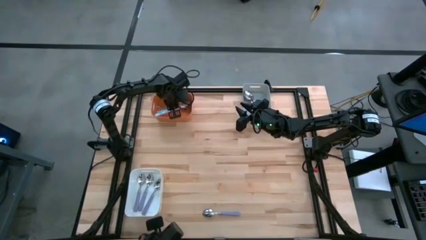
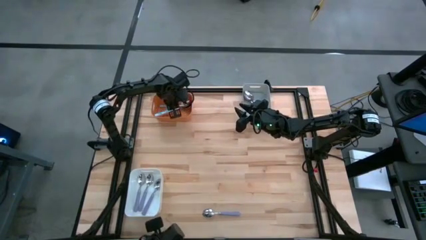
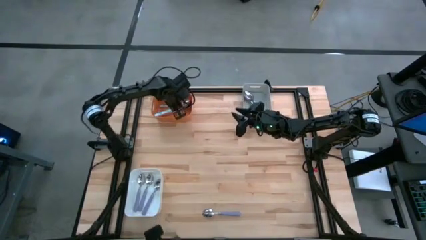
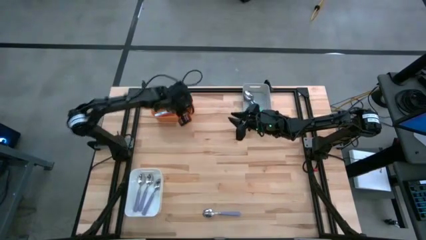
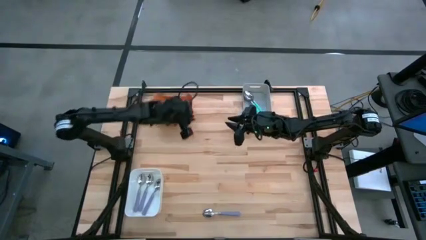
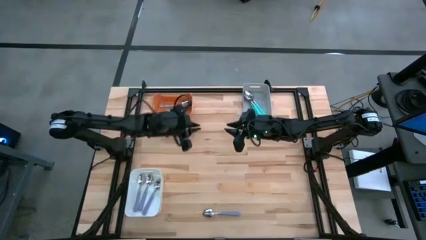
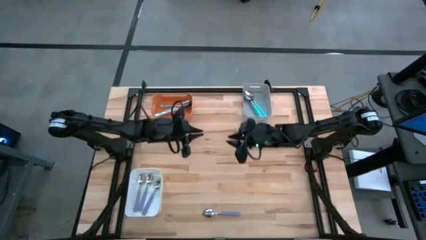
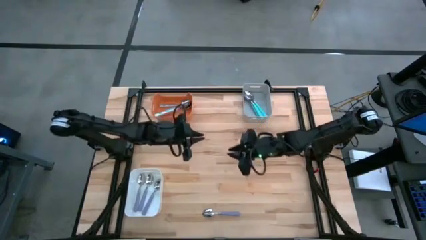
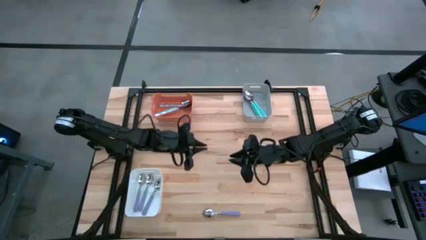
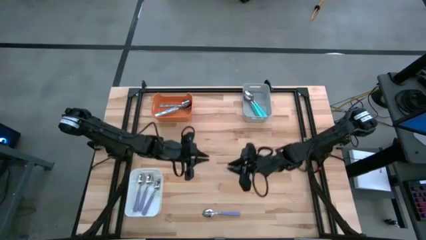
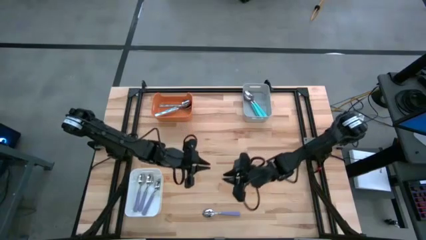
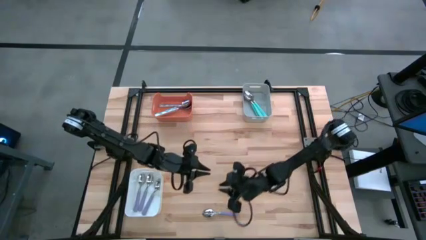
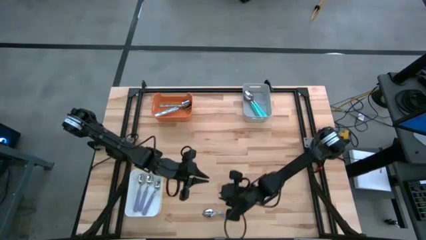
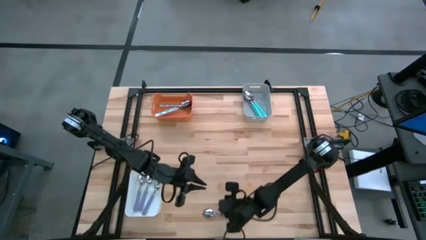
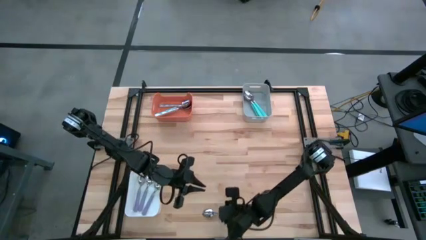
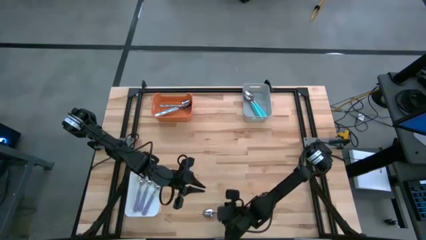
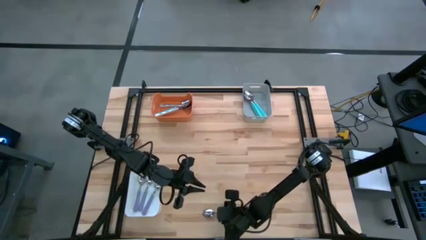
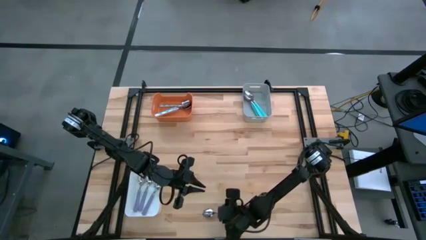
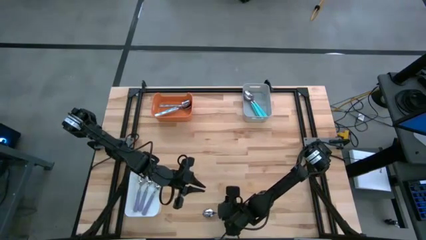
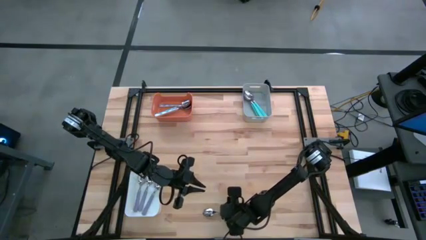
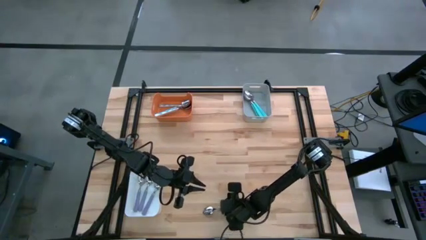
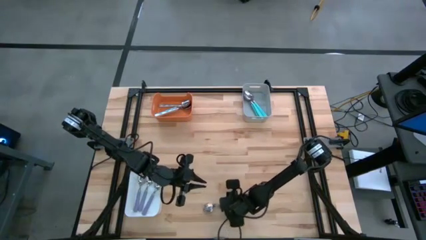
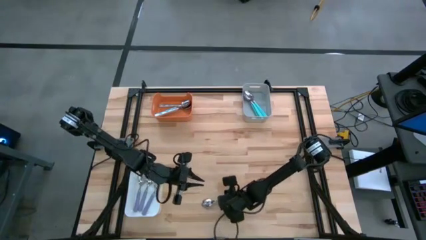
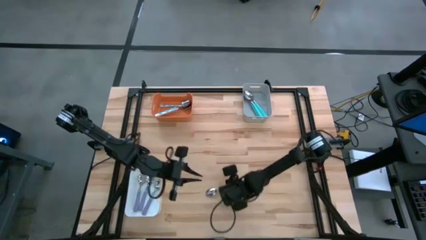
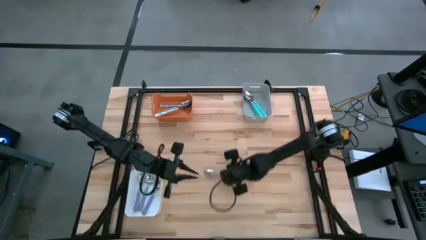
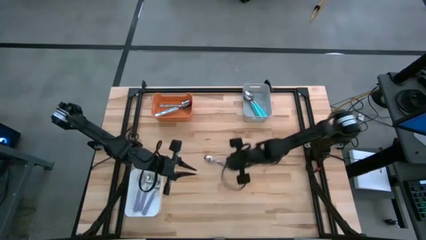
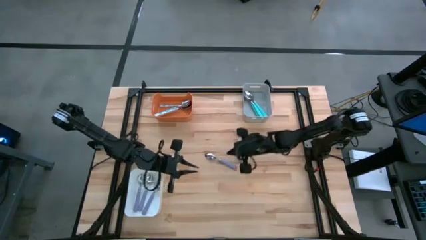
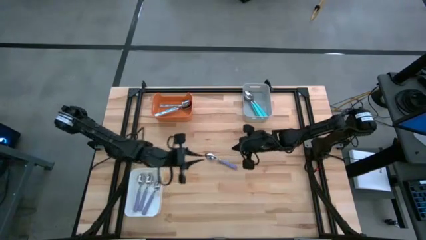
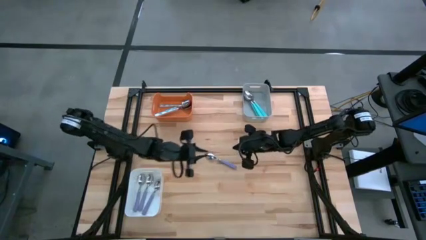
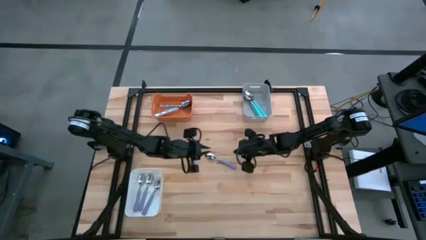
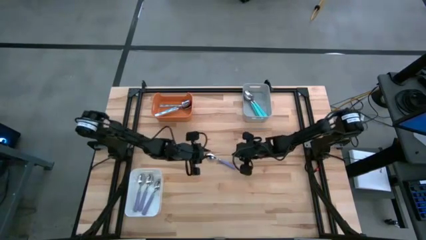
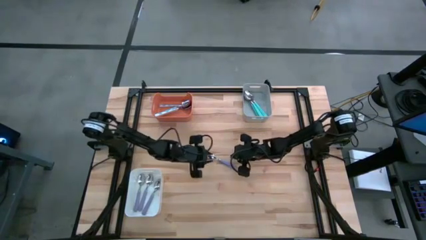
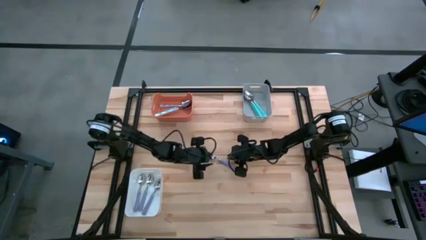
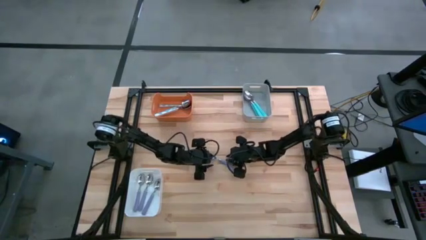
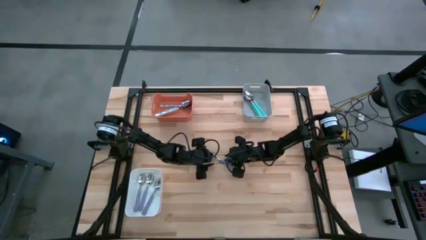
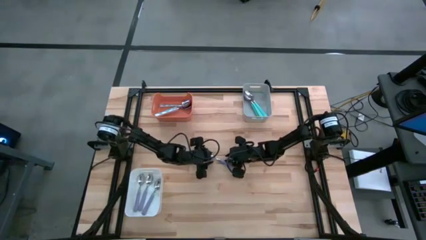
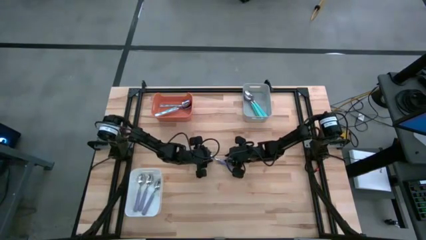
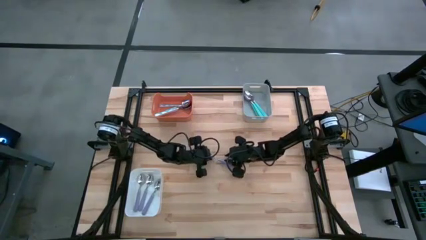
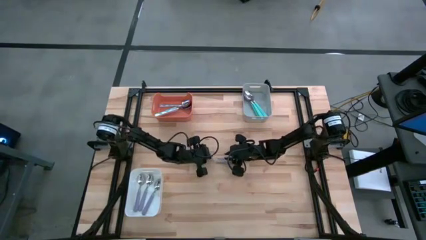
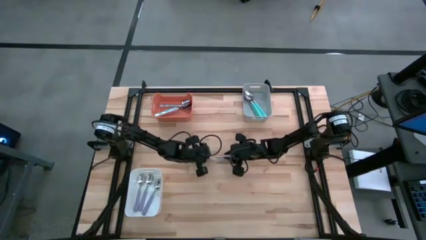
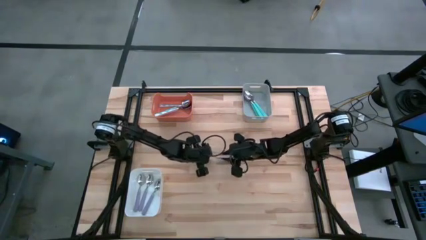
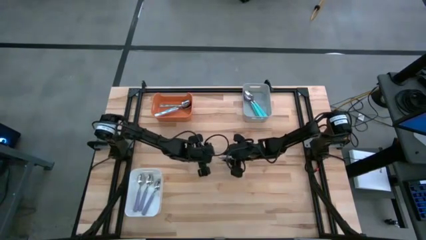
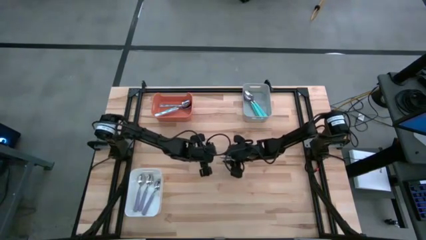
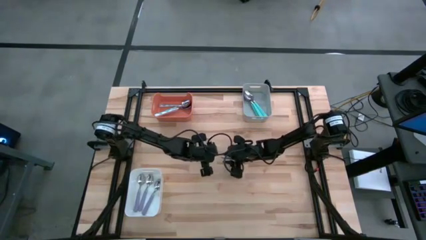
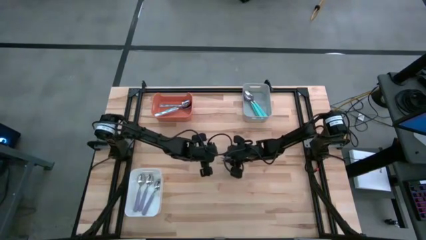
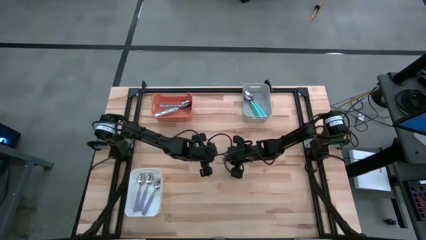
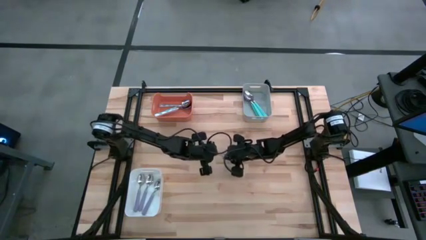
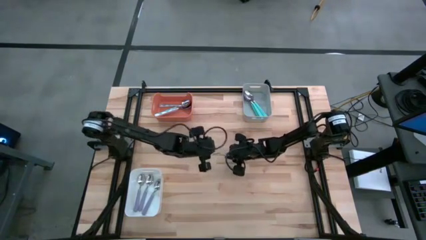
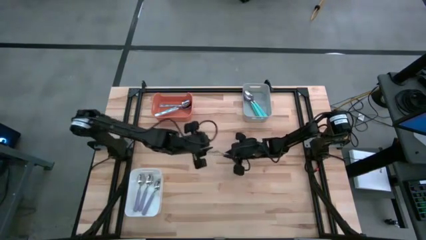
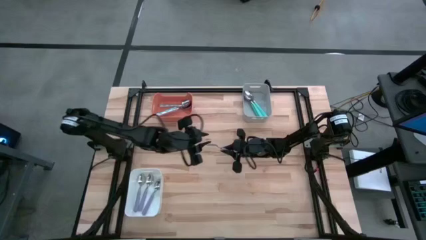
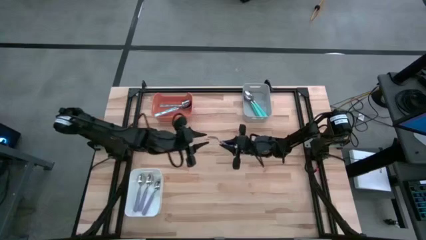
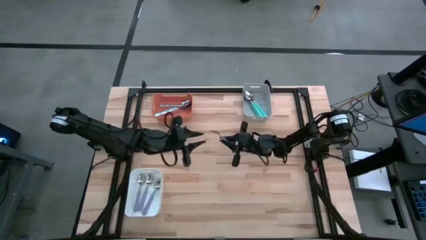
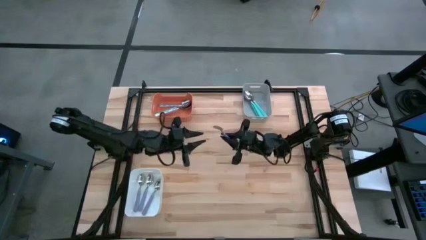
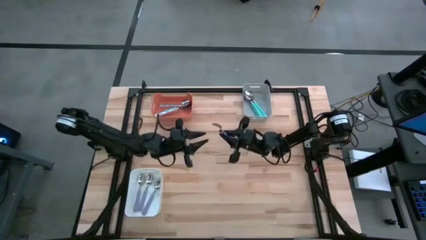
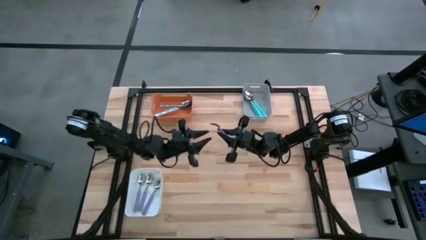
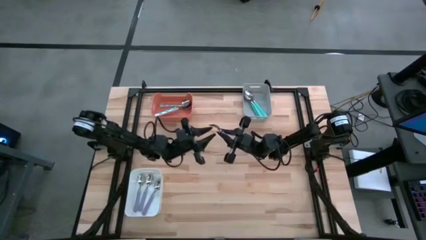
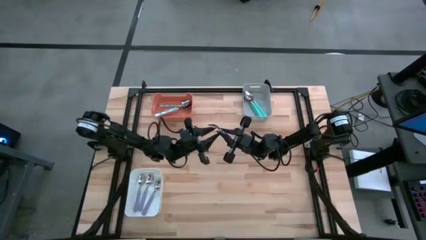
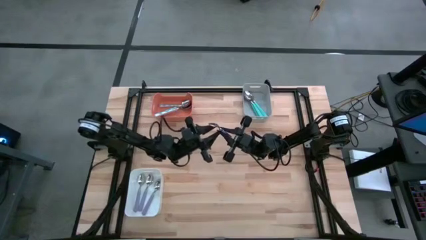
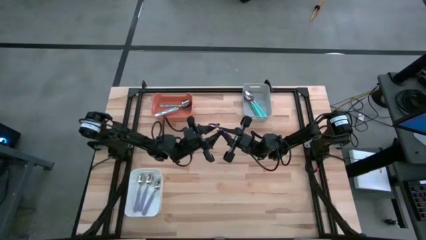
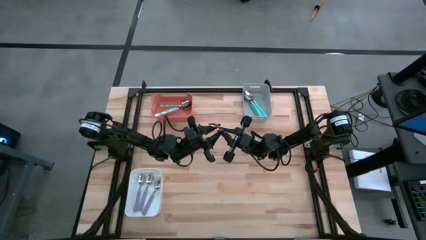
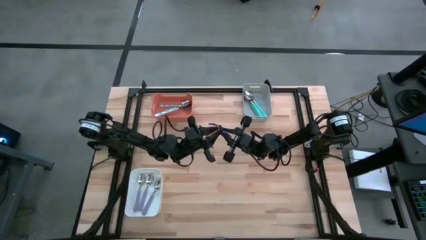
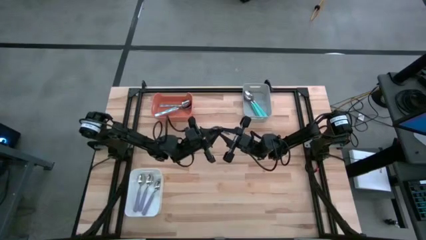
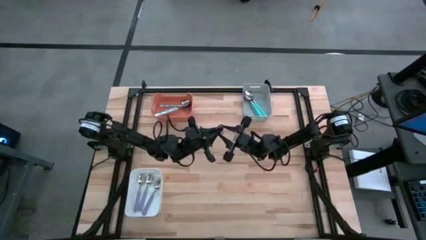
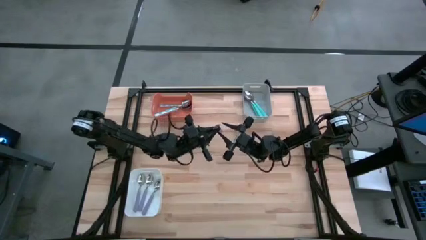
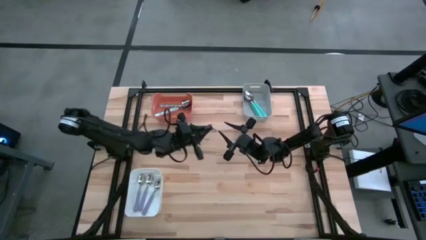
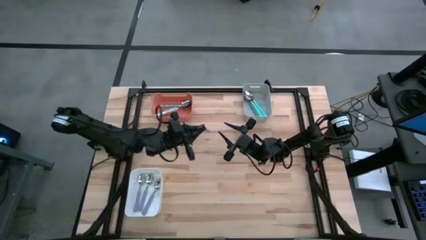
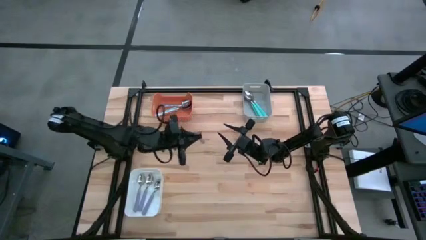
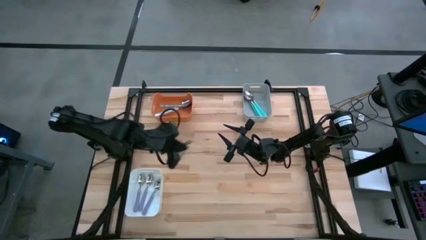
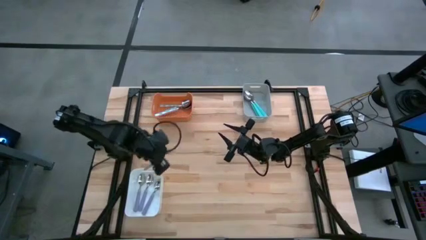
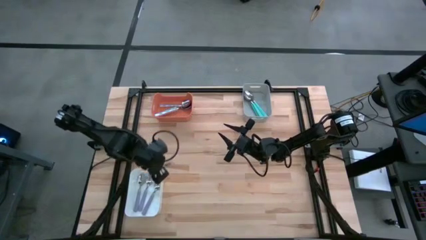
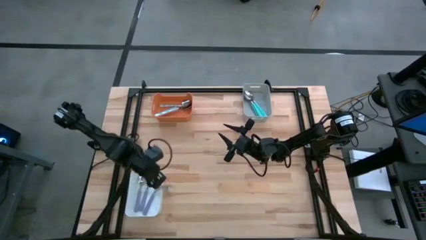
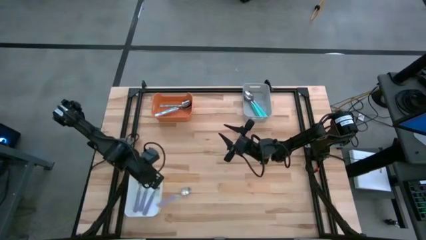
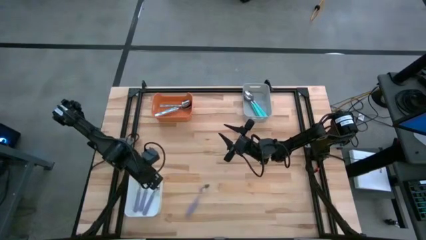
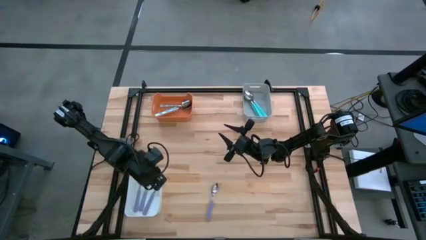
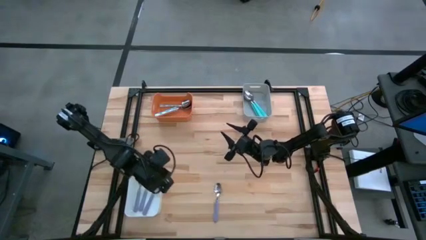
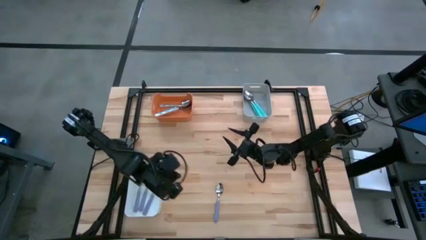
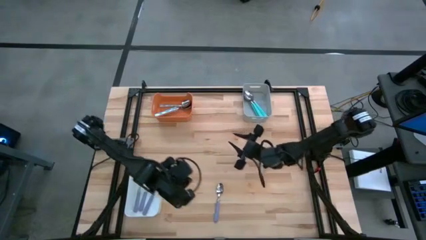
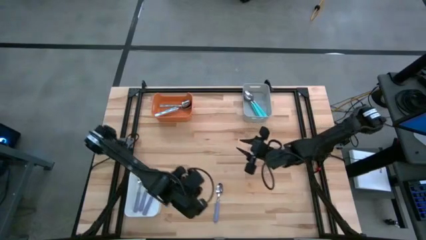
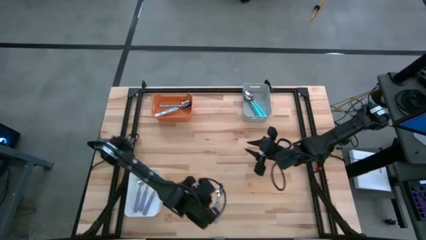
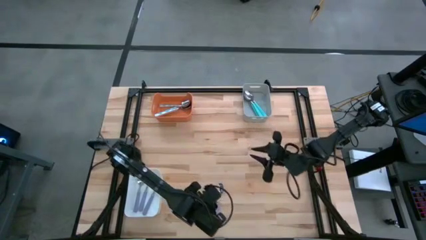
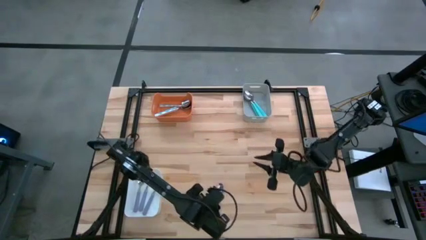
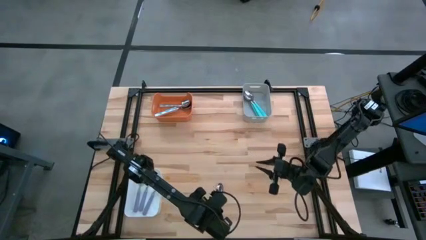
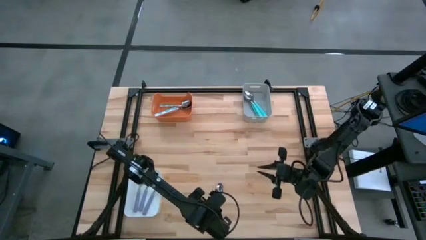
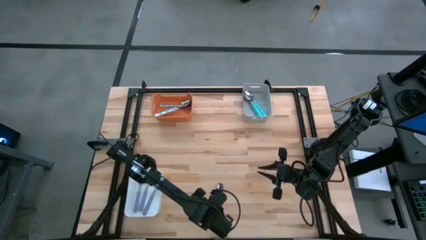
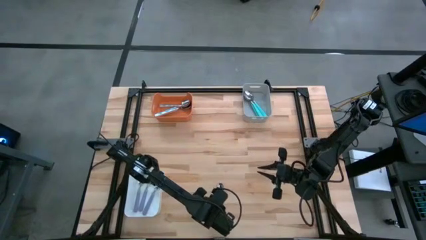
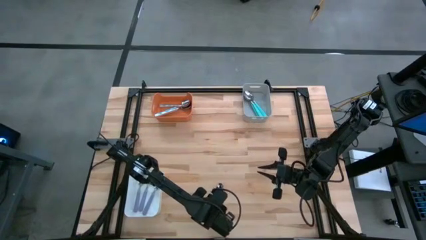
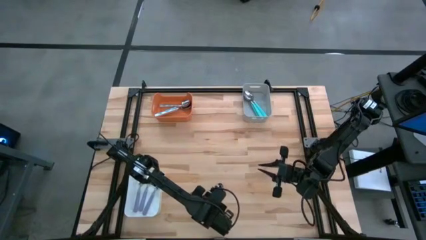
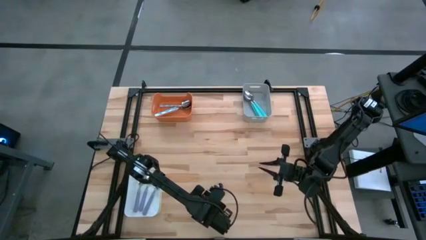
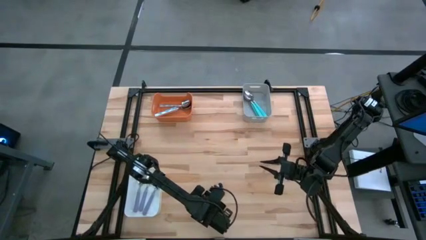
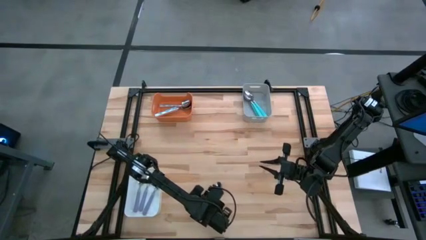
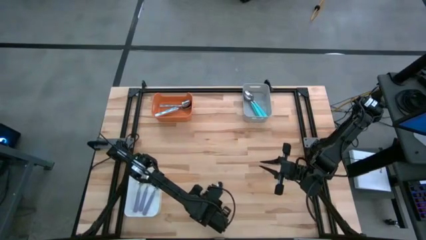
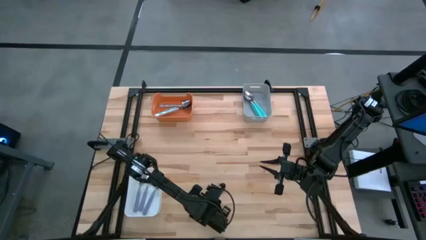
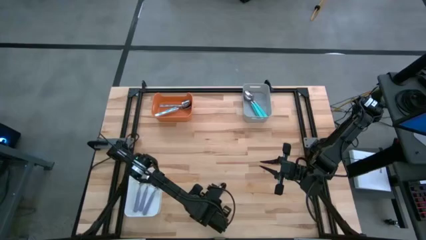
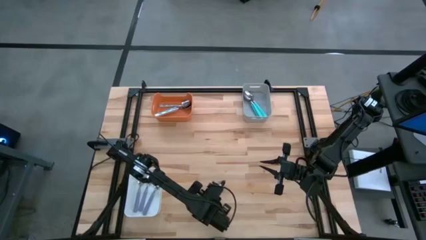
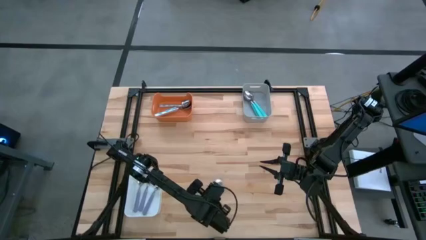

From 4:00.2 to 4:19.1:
Task: Sort silverware by color (type)
Put the purple spoon into the white bin
